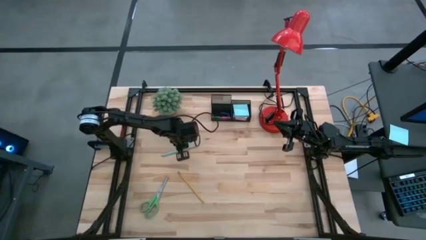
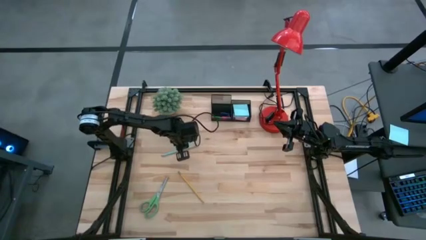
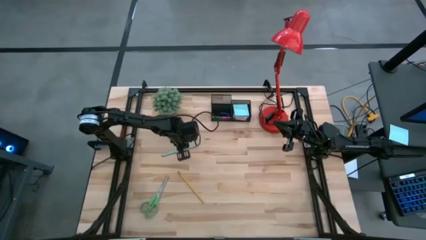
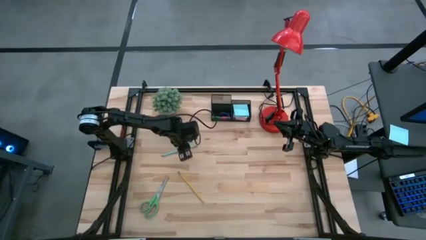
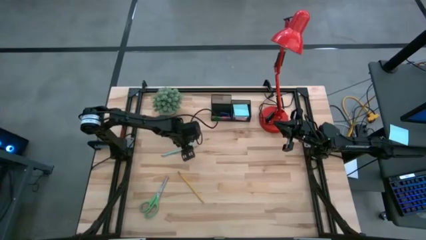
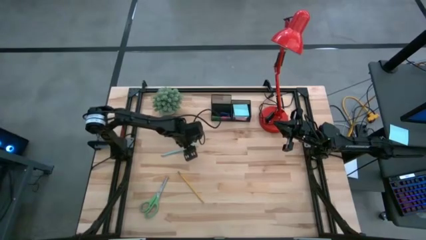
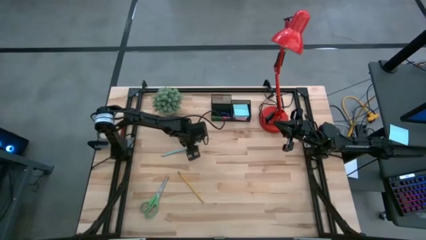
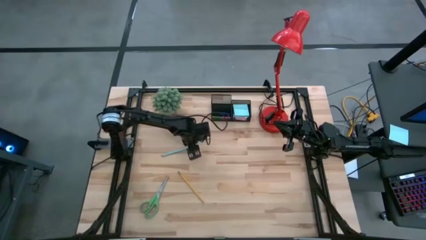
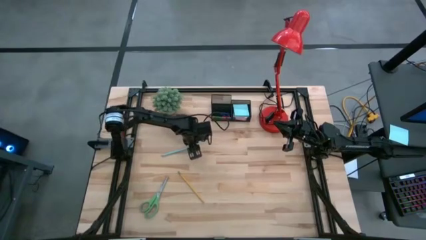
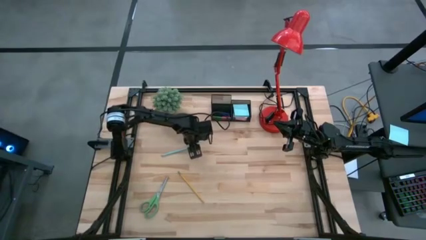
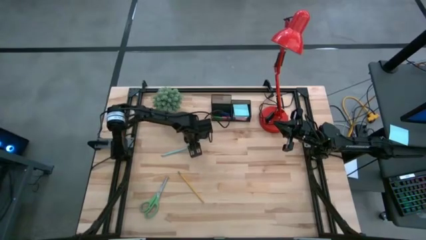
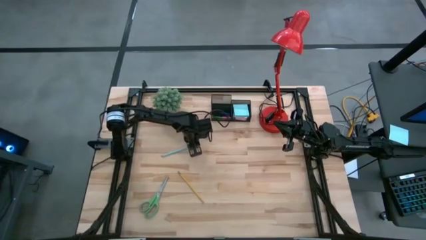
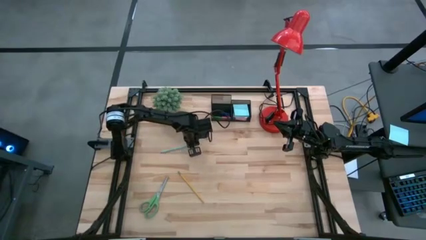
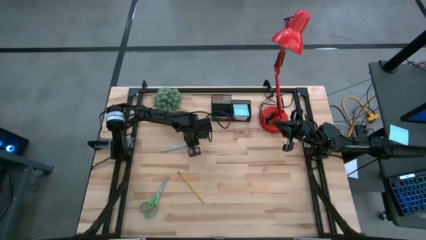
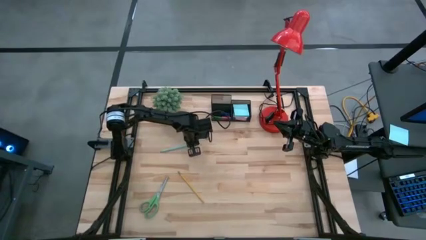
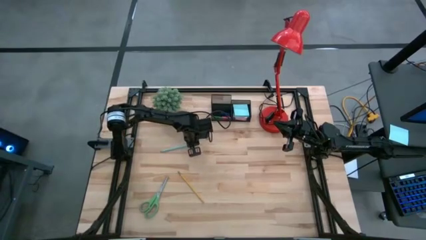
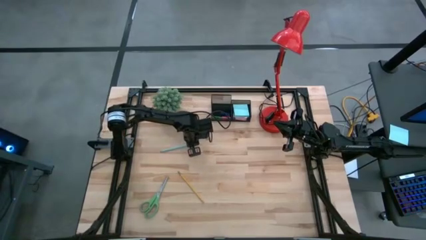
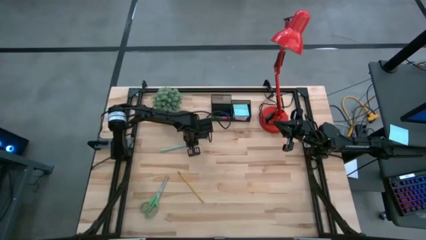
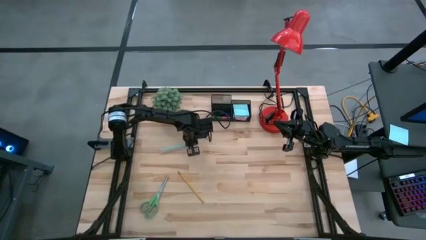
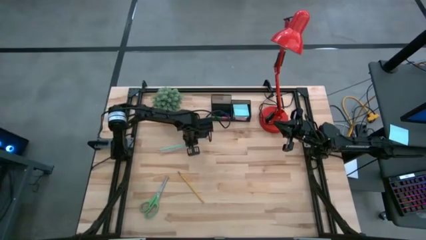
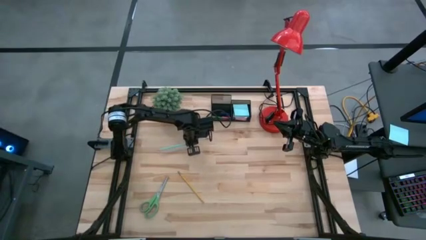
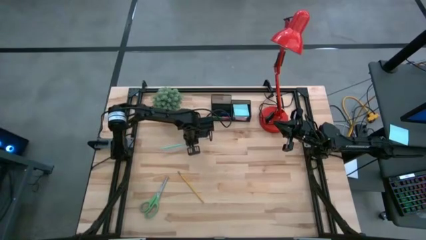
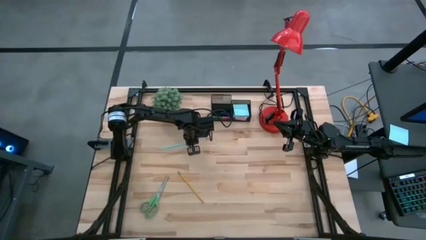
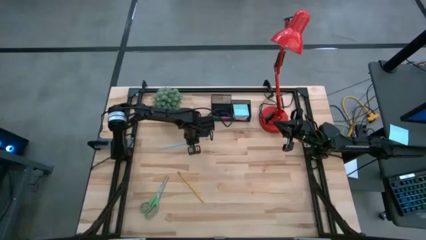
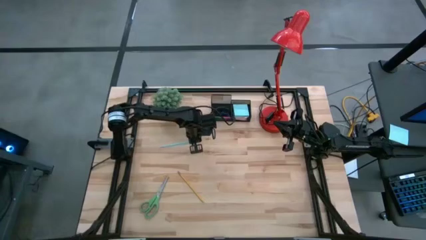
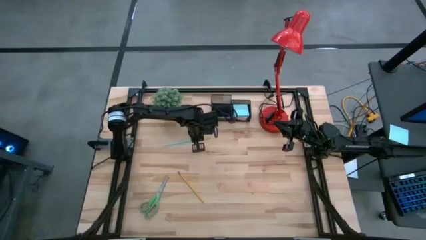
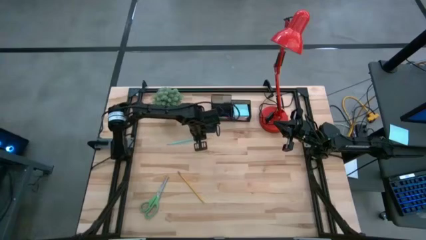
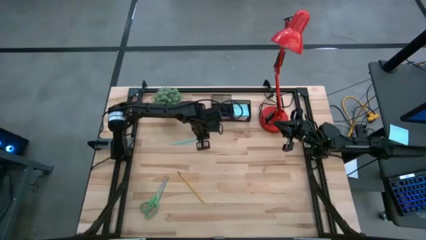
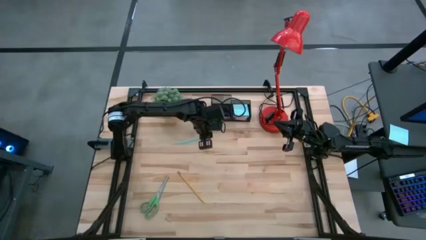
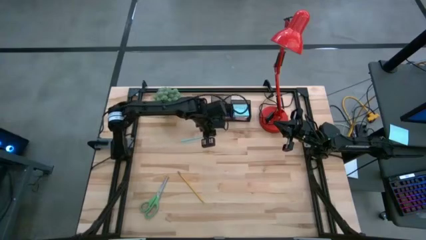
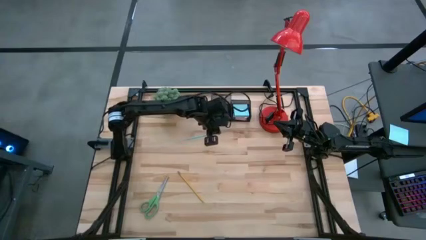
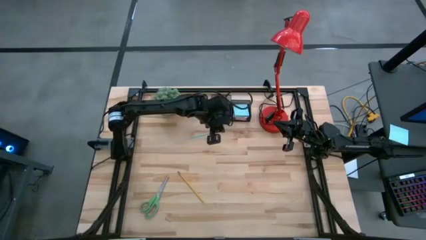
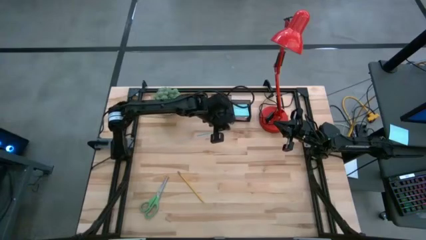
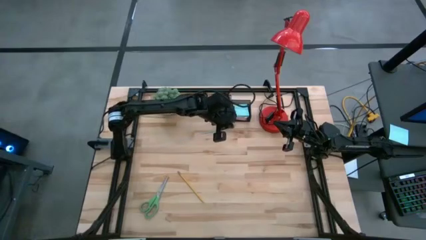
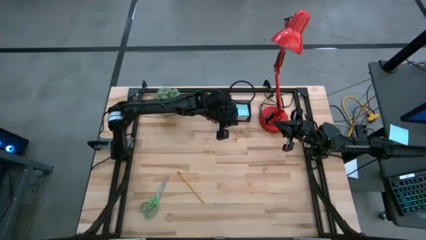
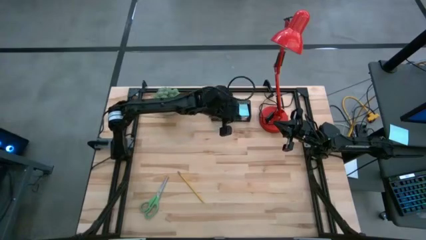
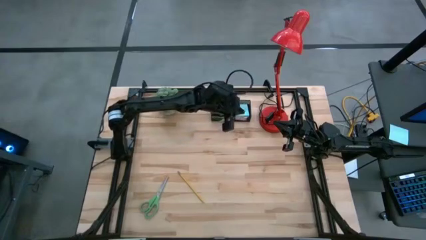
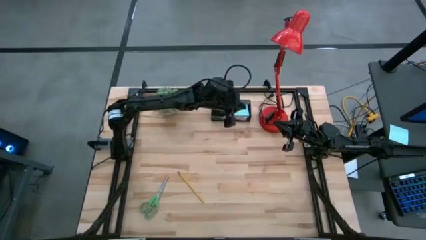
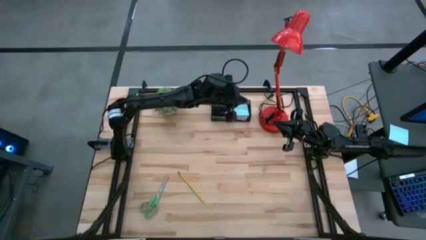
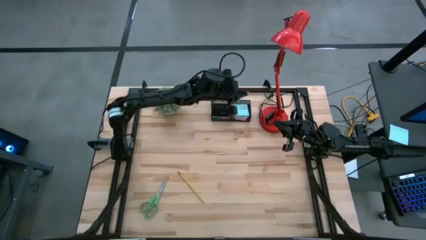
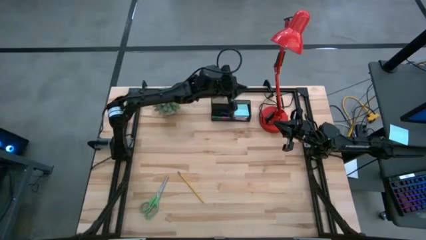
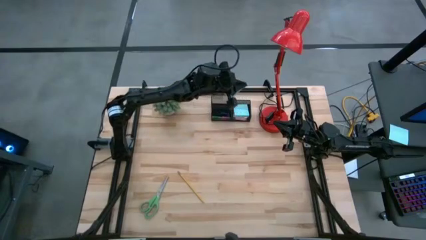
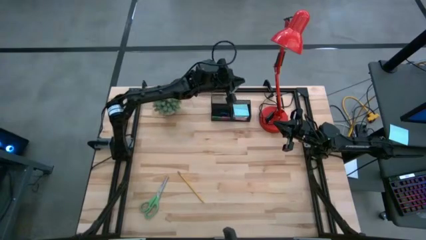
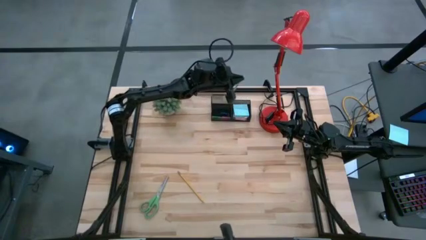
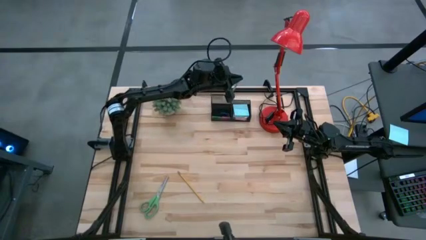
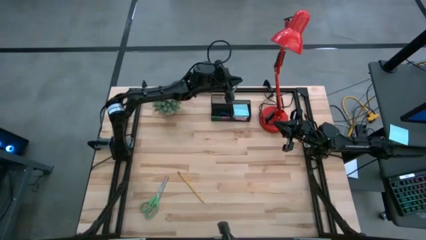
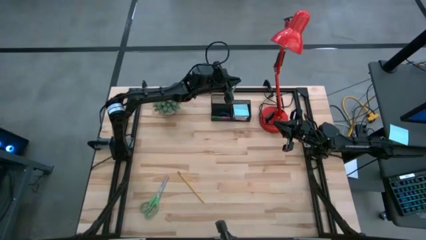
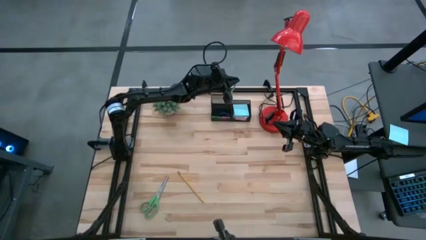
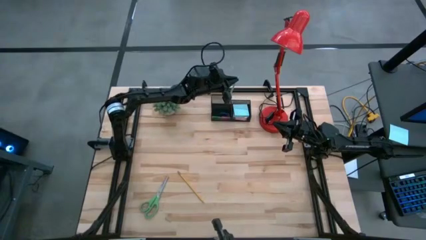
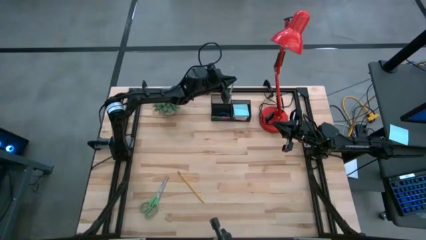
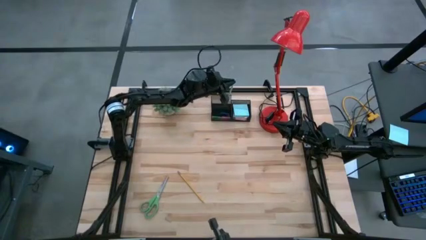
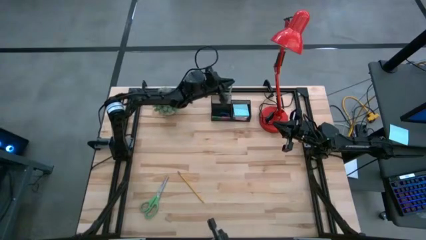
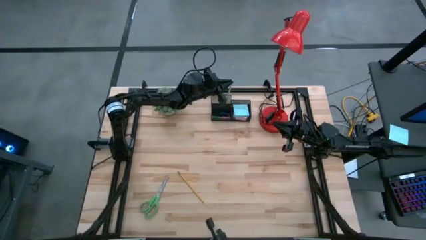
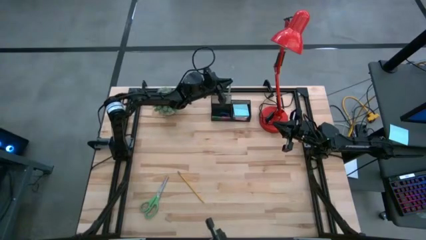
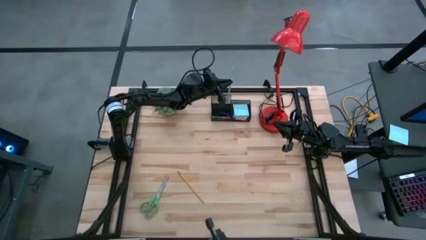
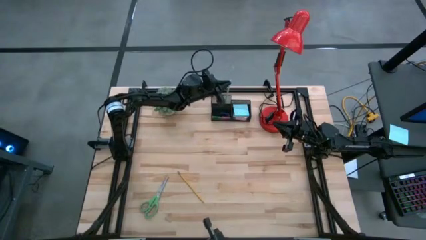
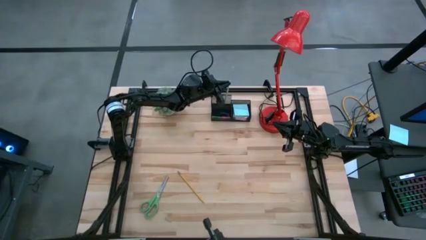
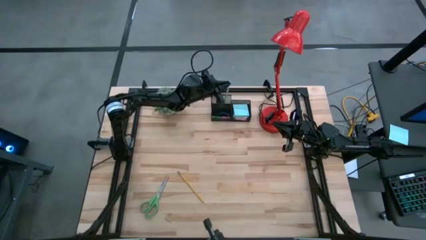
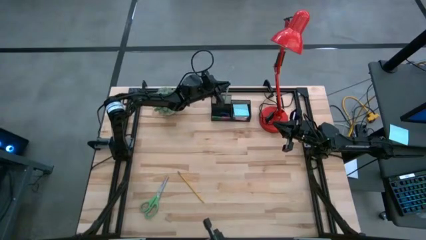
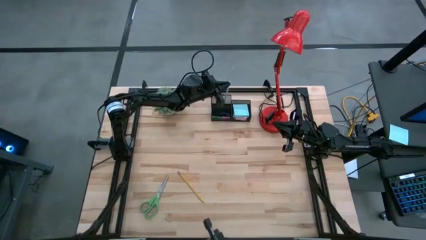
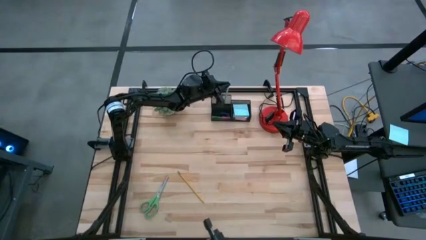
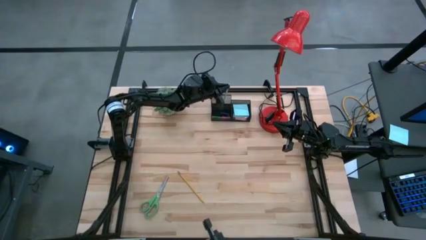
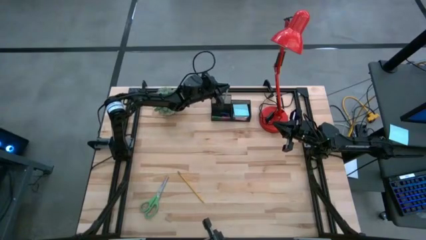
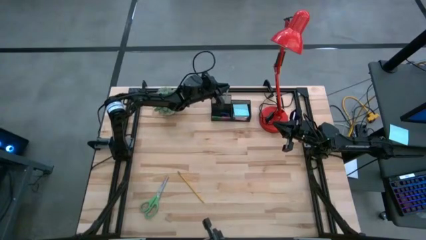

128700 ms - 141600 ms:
Task: Pick and place office supplies into organizer
Put the sky blue pencil into the desk organizer

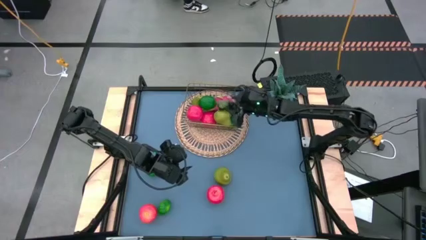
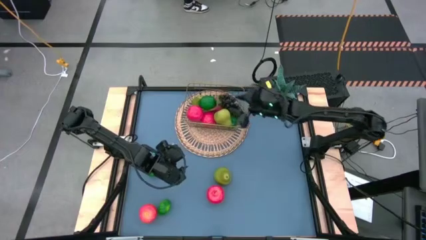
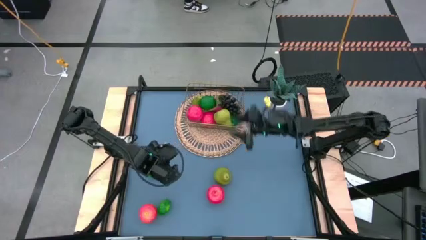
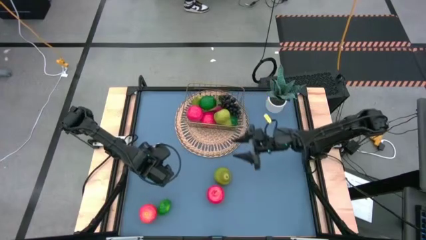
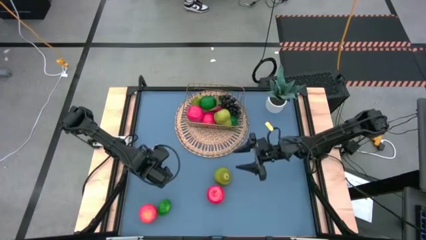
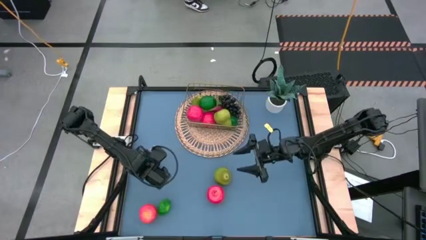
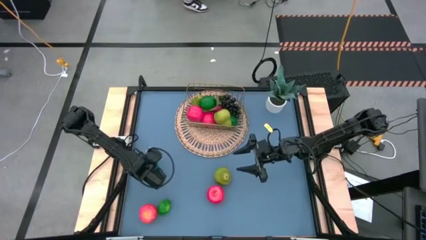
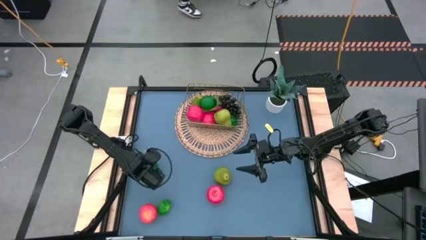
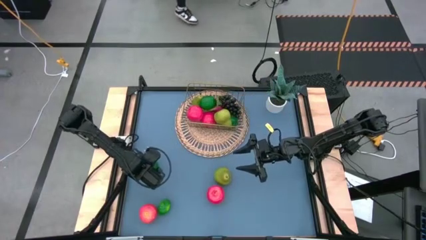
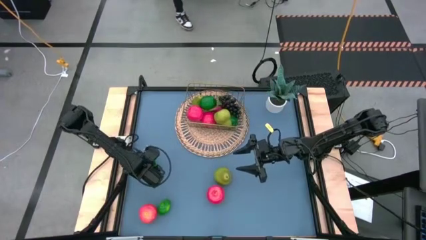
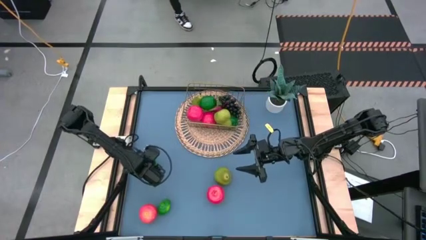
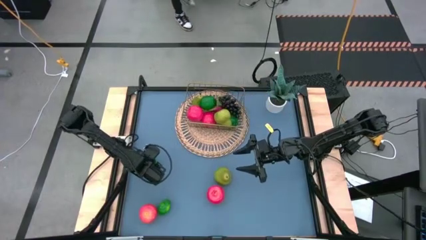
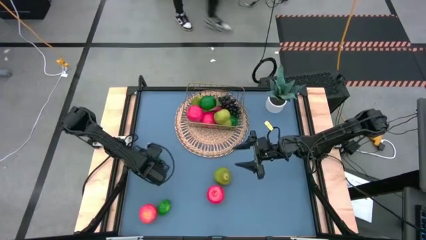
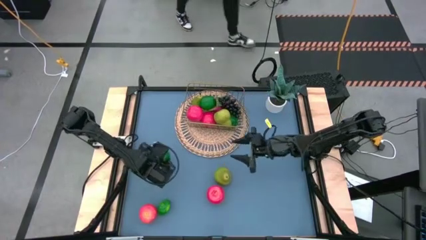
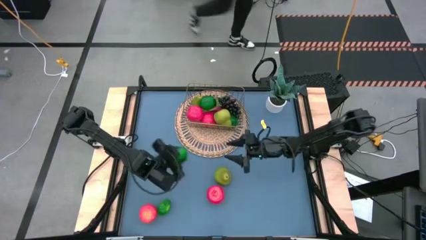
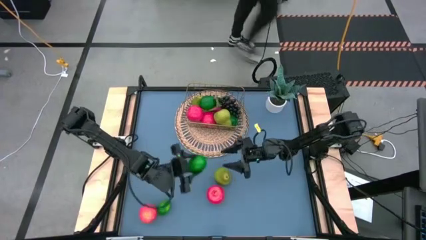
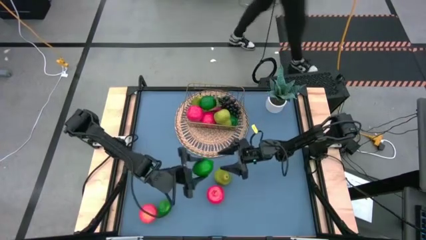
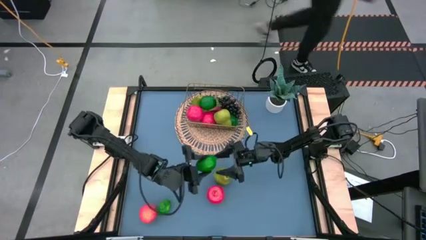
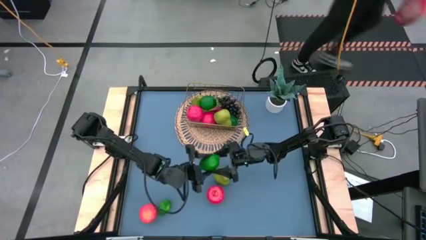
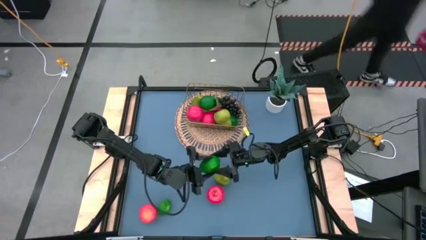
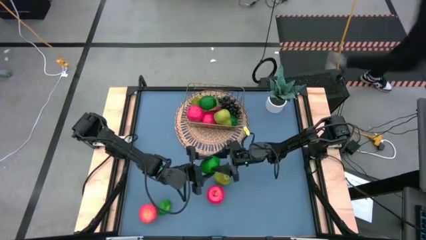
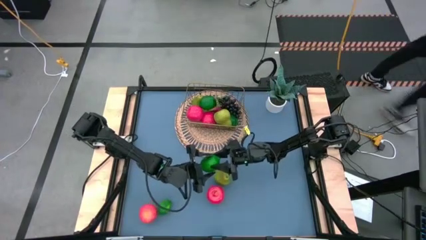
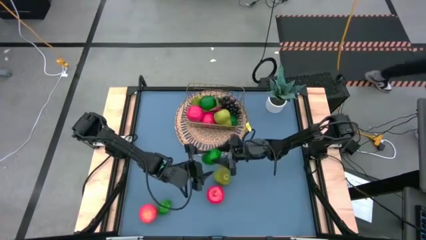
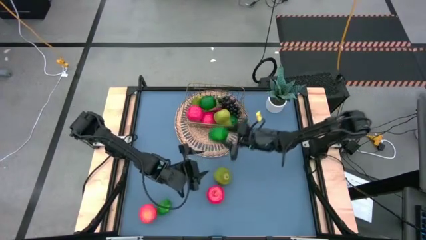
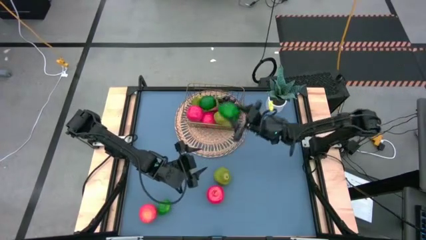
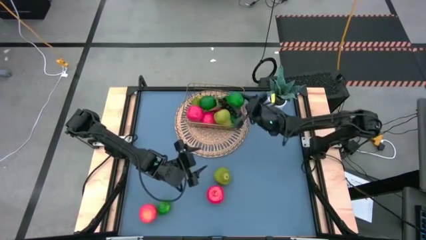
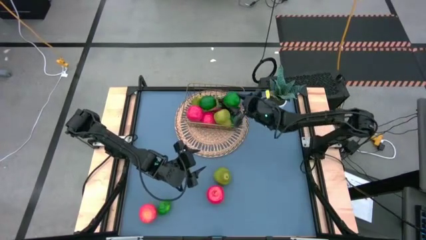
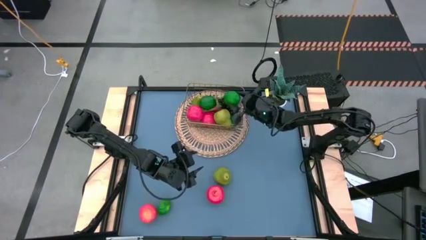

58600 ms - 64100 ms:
Task: Build produce basket
Put the green lime into the gold wire basket
